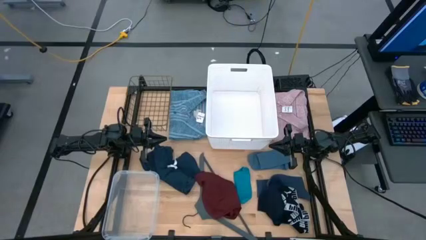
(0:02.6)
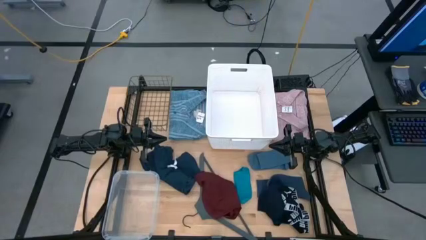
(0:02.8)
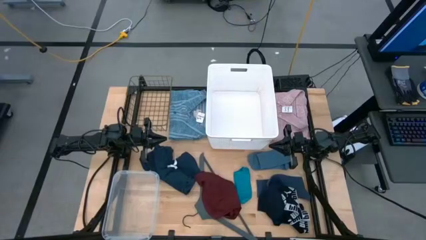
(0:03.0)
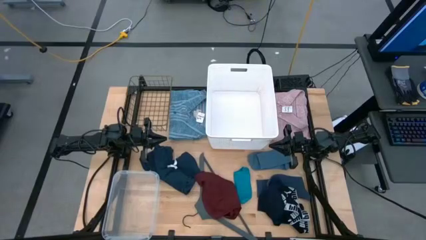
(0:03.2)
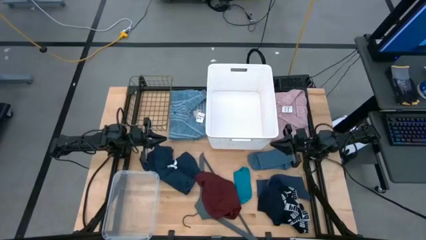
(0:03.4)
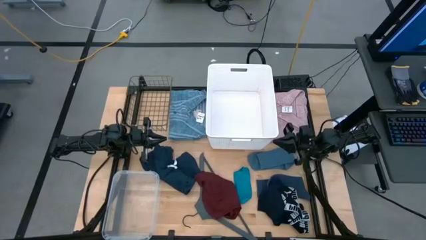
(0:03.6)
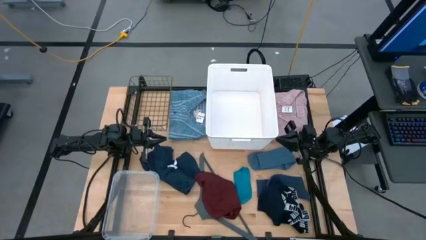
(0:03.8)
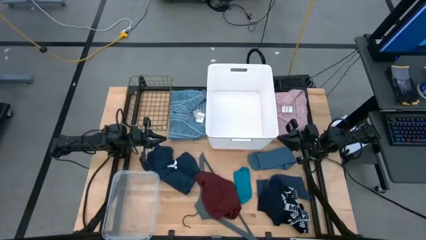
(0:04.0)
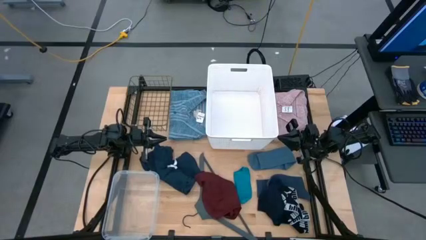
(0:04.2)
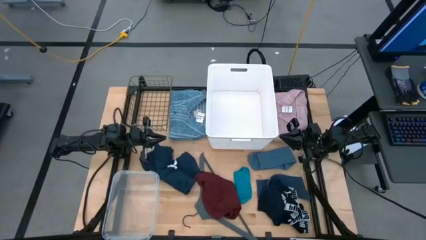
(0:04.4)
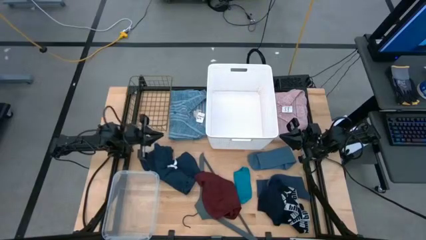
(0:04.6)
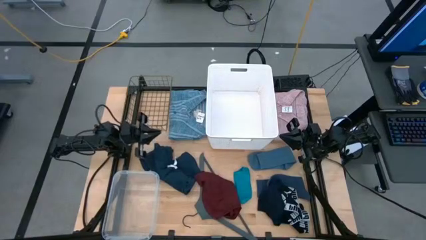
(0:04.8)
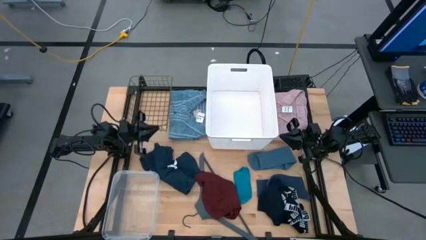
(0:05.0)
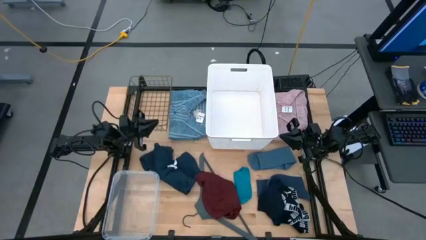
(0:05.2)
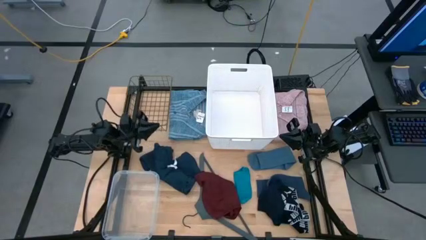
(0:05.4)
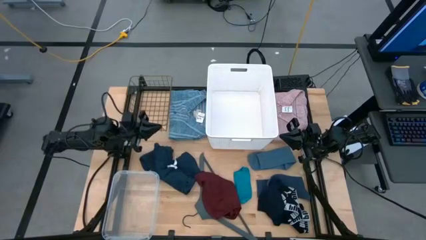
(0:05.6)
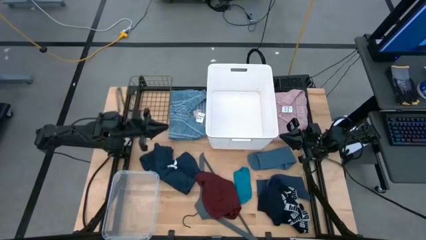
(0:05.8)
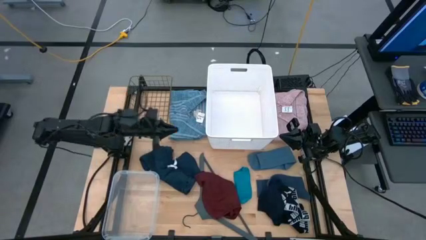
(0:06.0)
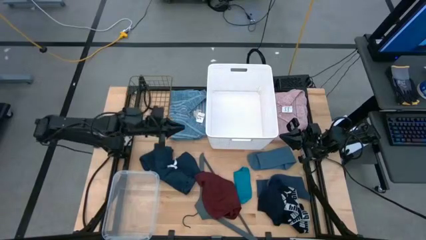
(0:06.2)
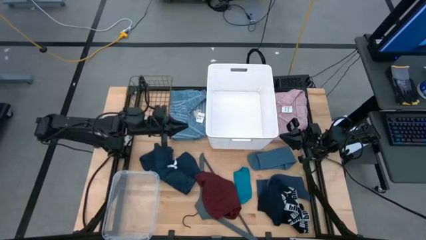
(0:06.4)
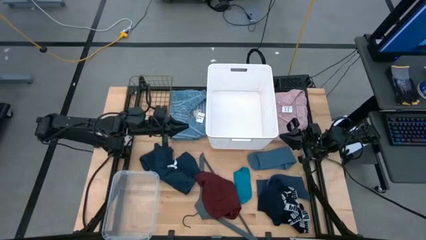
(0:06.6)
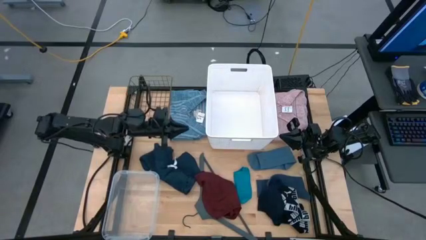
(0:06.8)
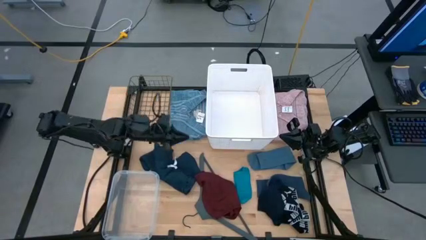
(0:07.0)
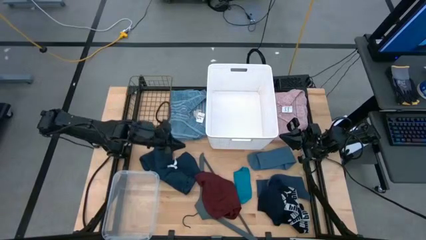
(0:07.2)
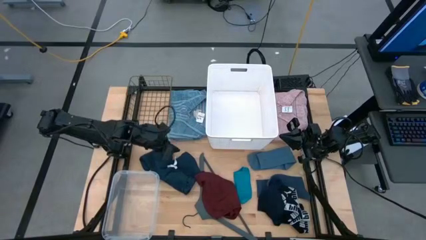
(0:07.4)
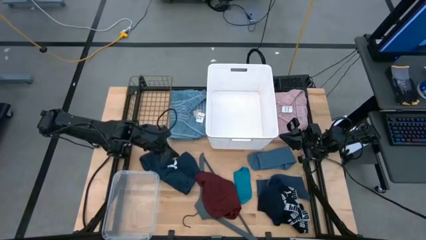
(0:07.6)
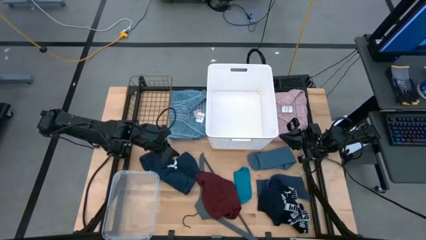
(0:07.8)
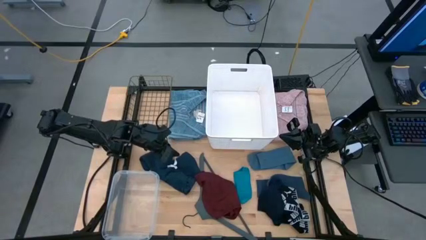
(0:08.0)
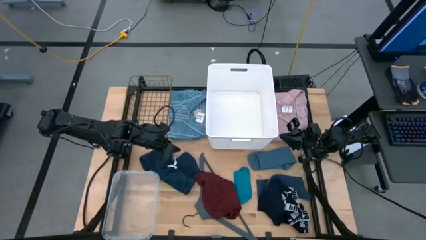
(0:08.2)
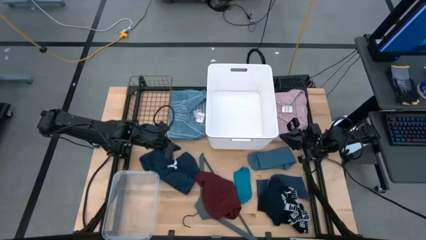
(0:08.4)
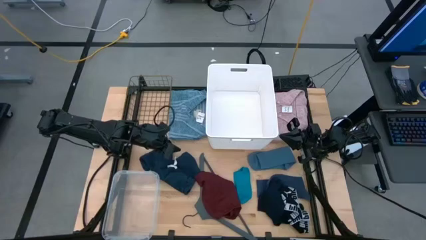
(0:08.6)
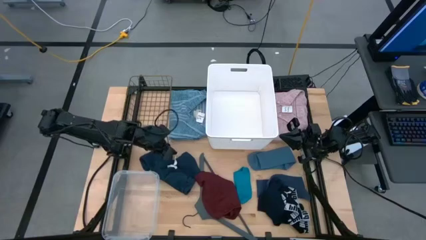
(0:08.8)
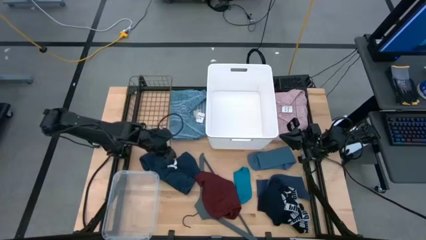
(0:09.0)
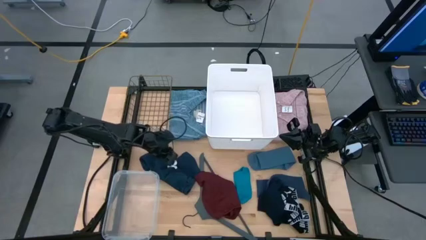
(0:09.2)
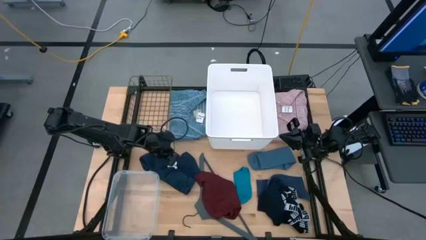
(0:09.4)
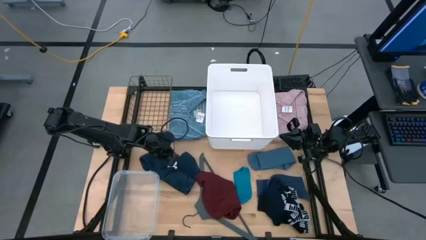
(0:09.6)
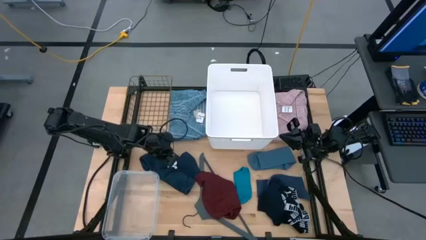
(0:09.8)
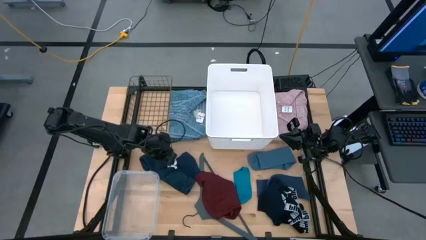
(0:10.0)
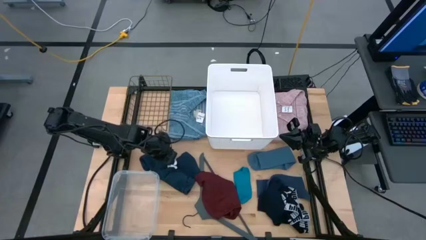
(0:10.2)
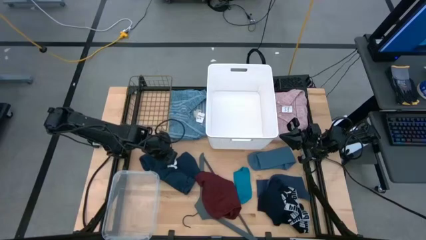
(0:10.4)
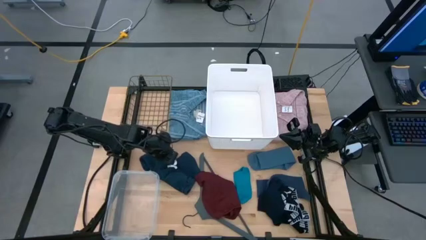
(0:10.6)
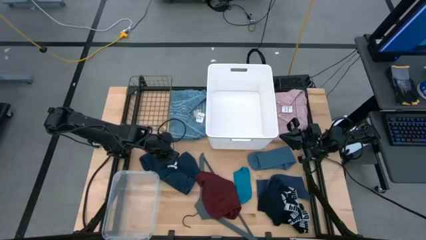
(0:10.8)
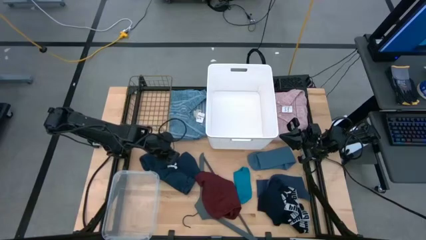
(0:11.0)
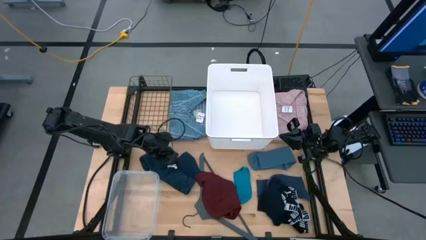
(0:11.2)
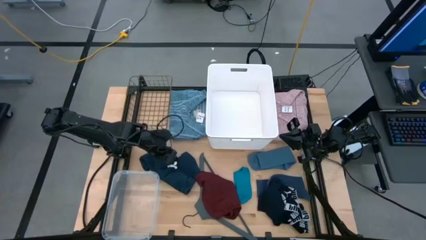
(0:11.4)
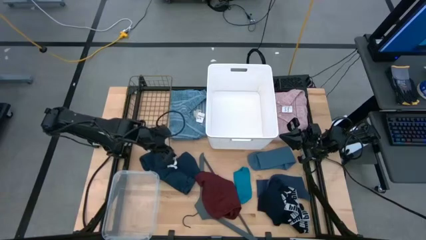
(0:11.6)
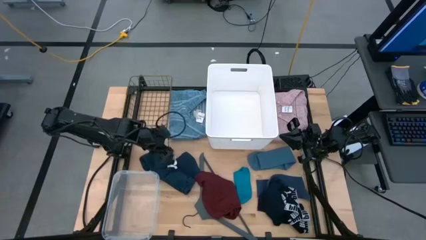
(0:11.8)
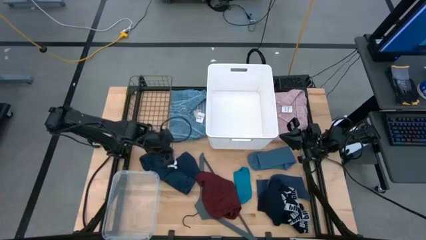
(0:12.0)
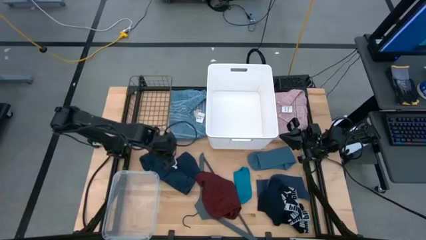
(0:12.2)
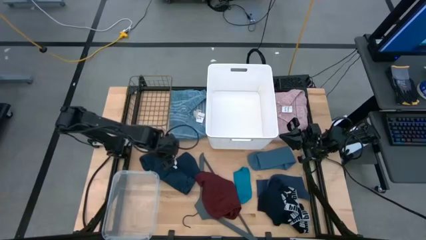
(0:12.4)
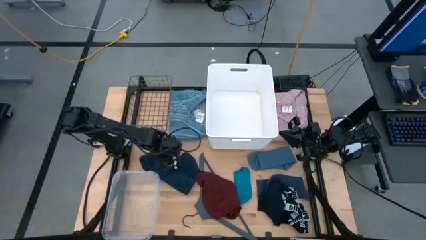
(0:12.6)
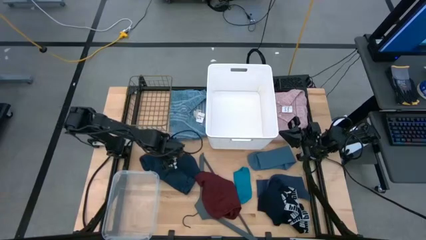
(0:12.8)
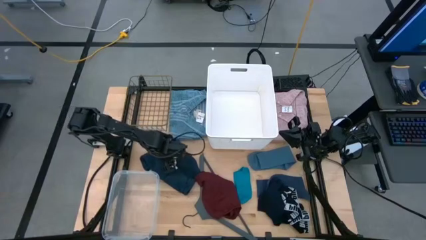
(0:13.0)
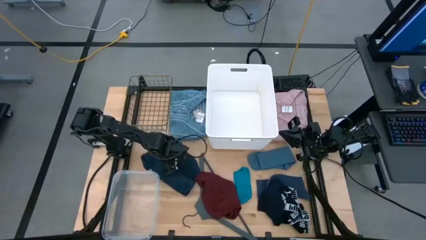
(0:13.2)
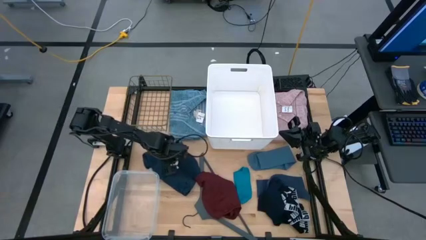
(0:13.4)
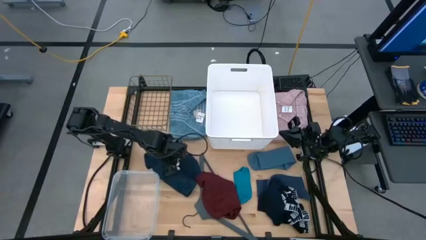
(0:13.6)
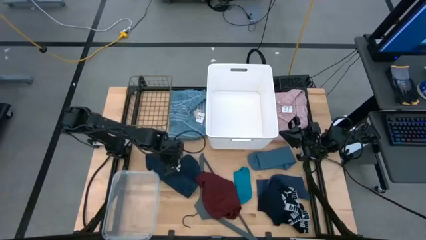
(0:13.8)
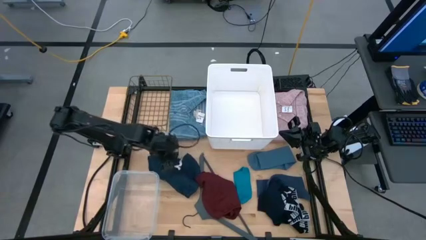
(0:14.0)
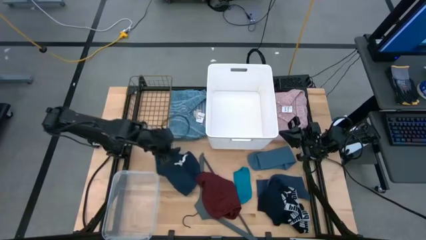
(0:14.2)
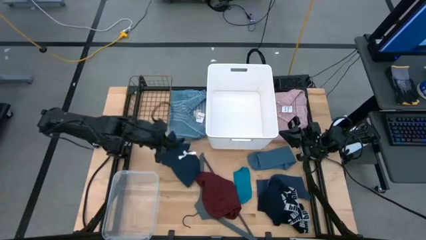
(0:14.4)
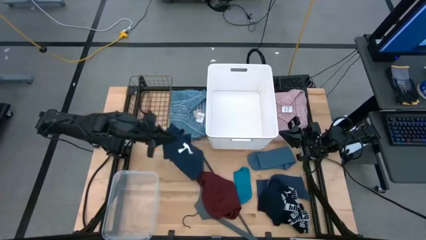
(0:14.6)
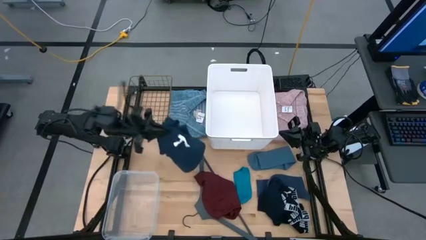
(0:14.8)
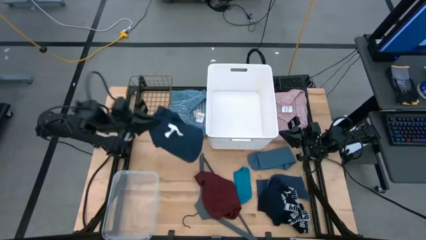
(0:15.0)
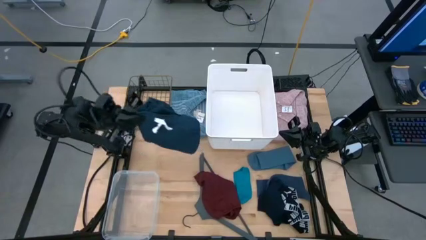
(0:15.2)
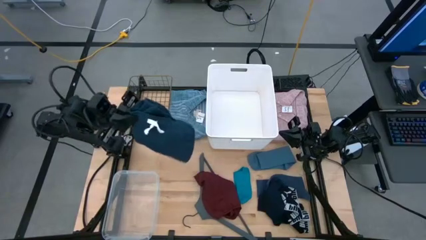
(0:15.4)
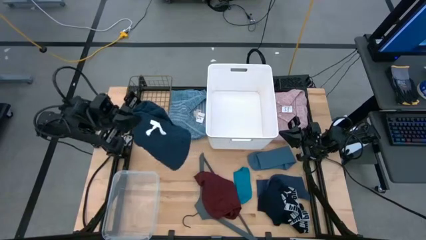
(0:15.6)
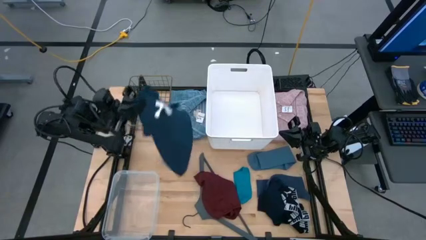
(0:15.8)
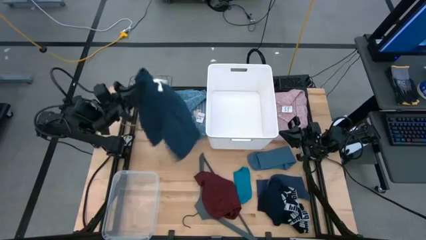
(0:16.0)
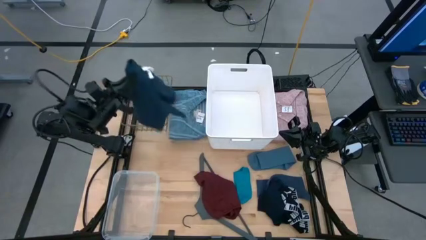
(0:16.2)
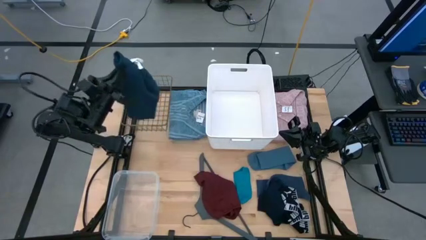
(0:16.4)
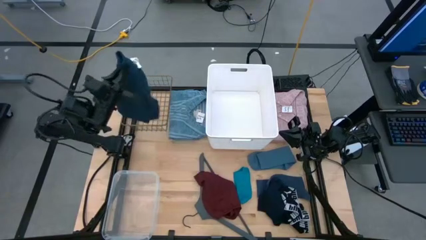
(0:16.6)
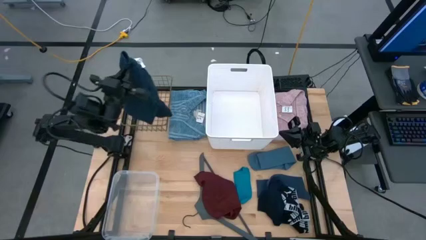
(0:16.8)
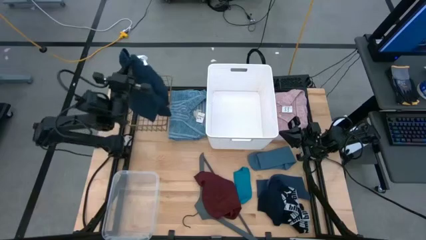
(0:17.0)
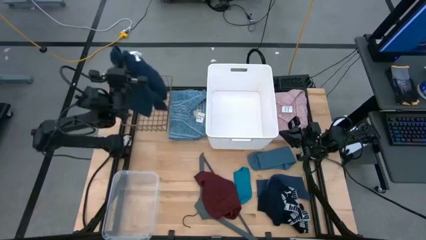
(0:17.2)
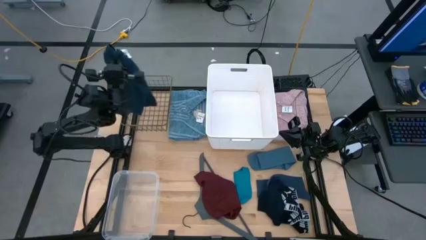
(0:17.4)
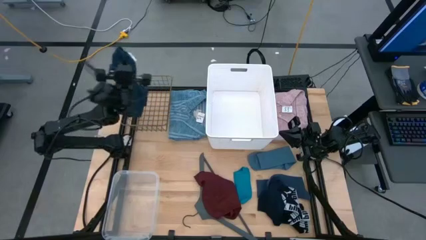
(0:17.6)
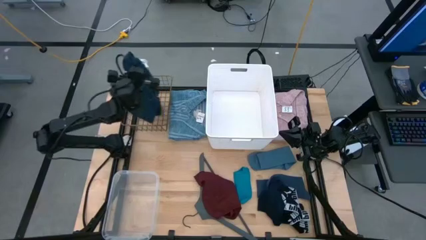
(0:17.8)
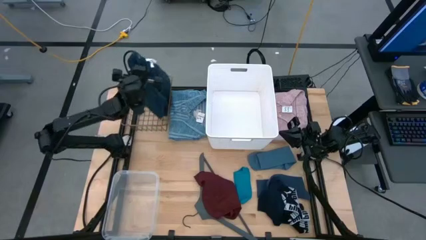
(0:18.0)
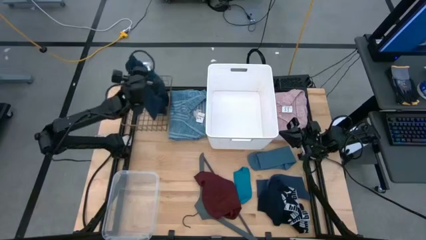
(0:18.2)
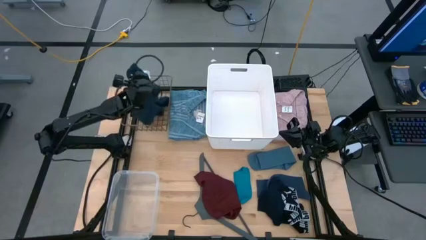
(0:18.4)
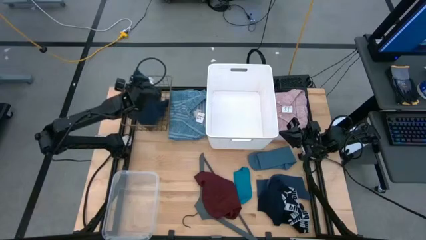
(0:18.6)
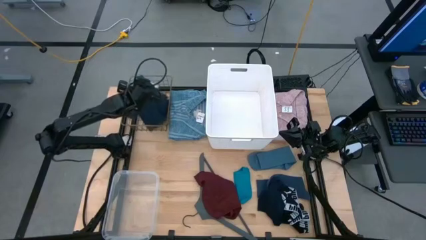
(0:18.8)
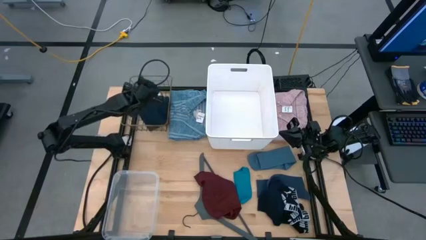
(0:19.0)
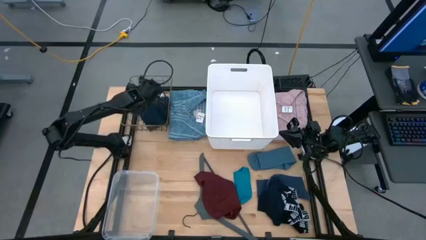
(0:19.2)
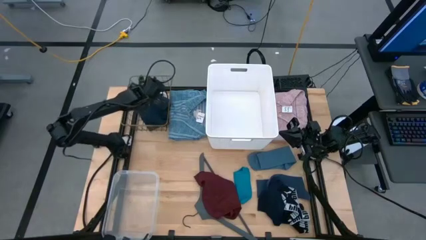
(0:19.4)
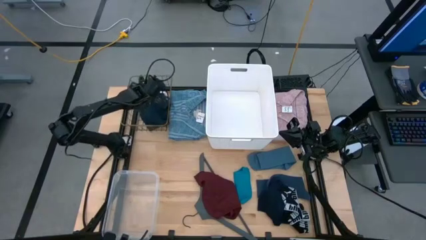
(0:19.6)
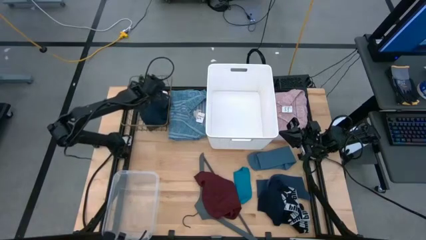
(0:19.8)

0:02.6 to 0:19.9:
Task: Pick & Place Cloths
Put the blue underpants into the wire basket
